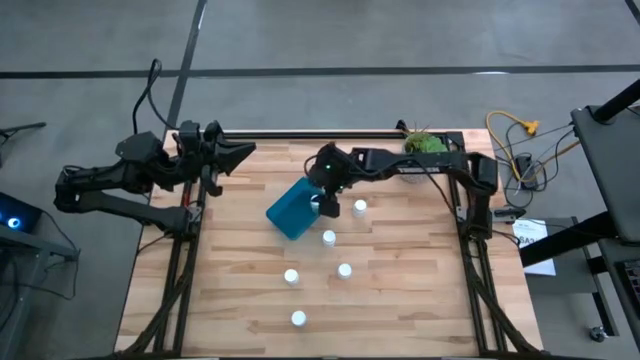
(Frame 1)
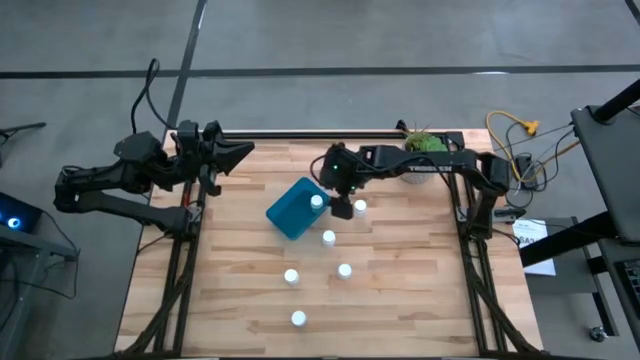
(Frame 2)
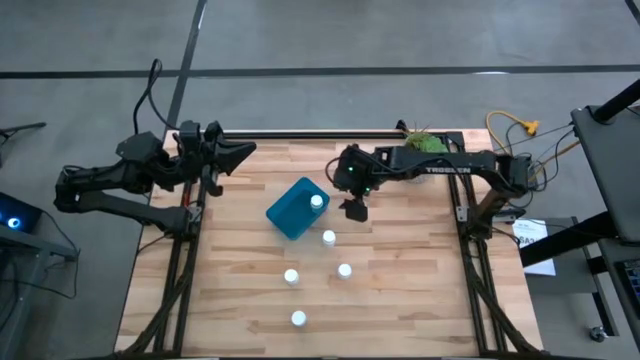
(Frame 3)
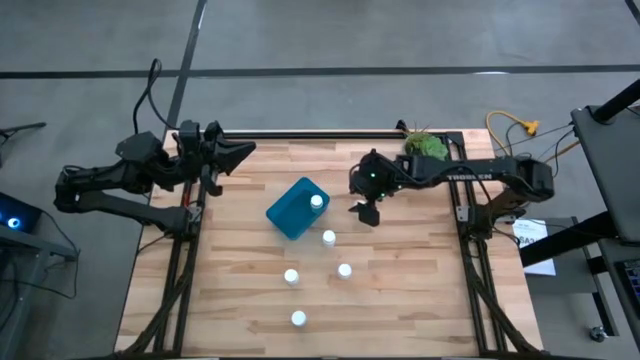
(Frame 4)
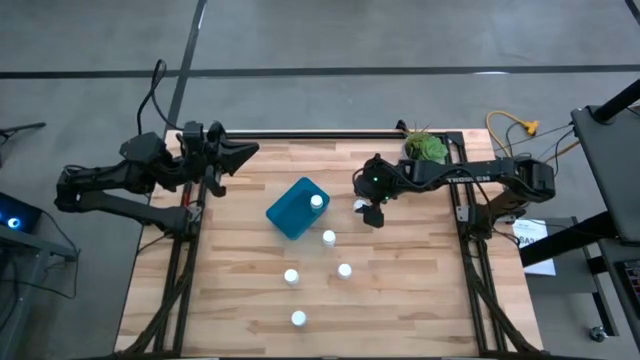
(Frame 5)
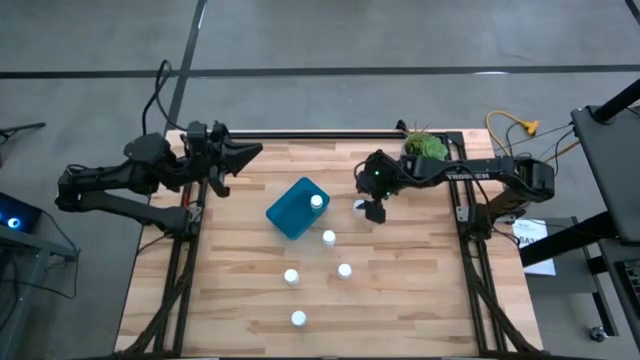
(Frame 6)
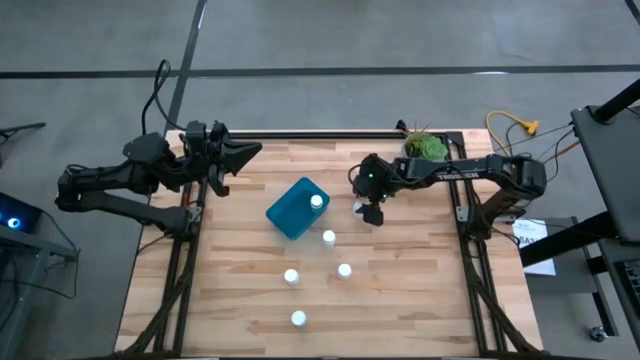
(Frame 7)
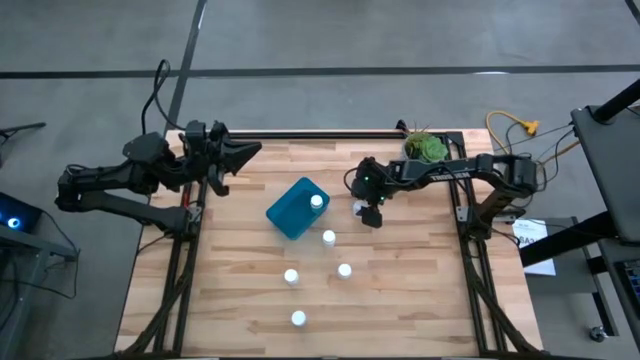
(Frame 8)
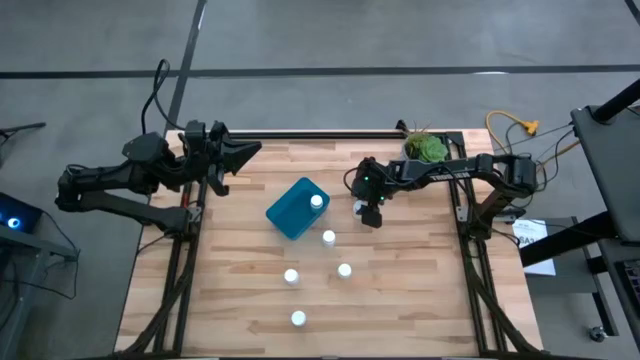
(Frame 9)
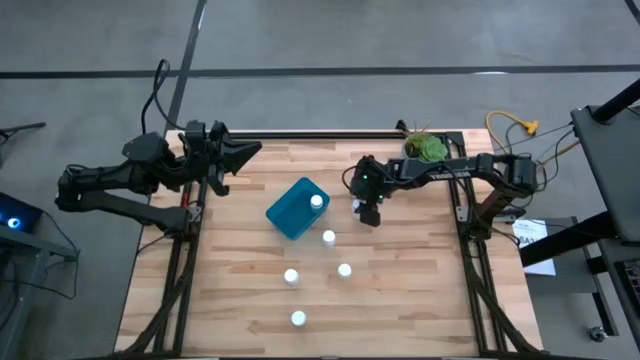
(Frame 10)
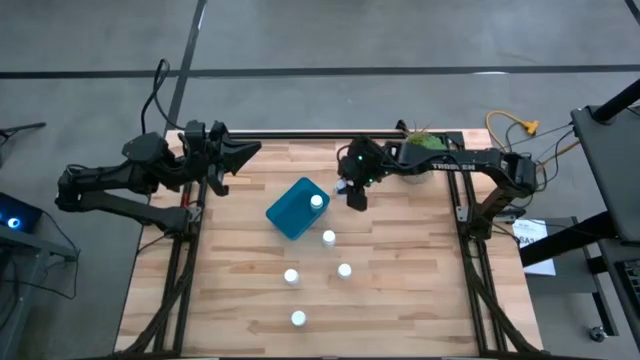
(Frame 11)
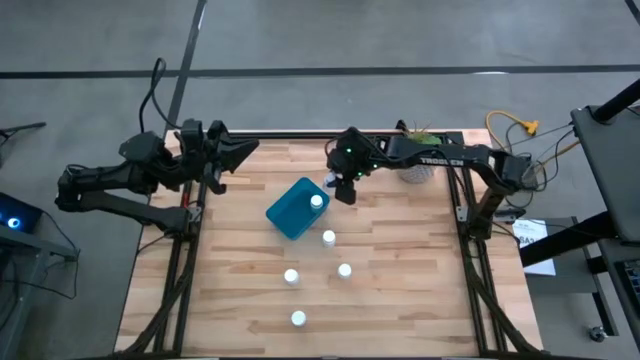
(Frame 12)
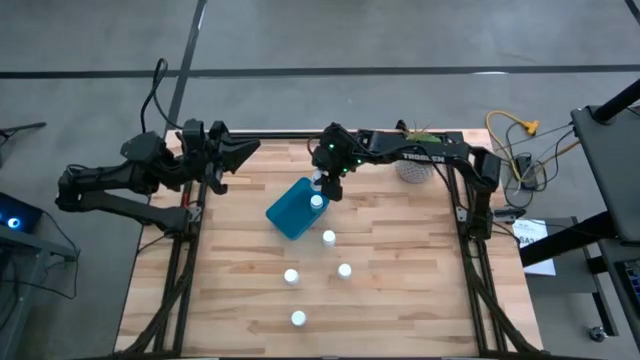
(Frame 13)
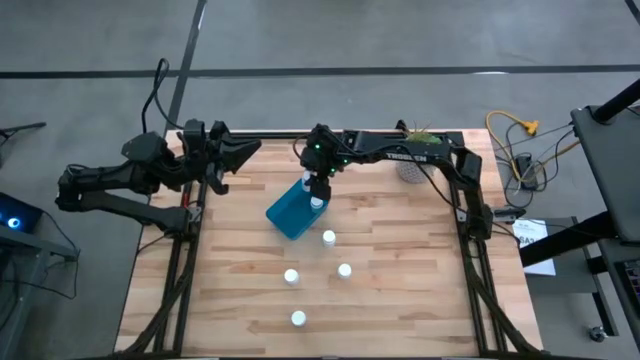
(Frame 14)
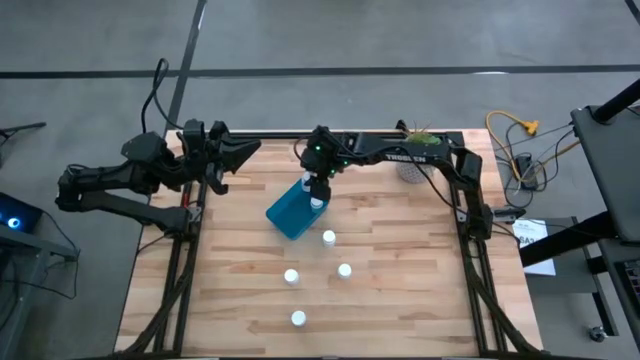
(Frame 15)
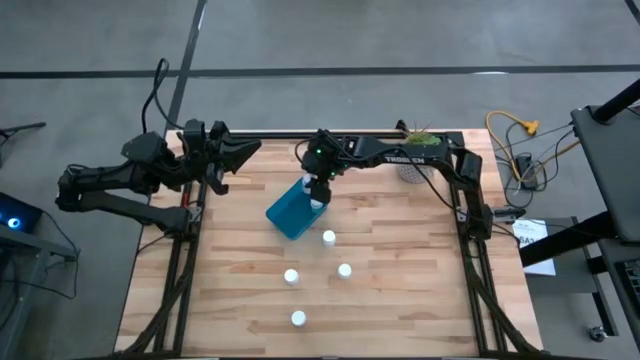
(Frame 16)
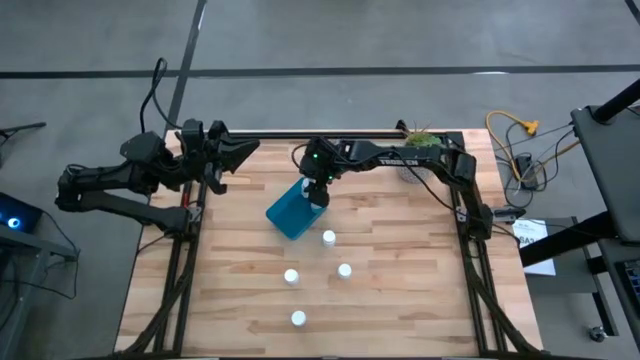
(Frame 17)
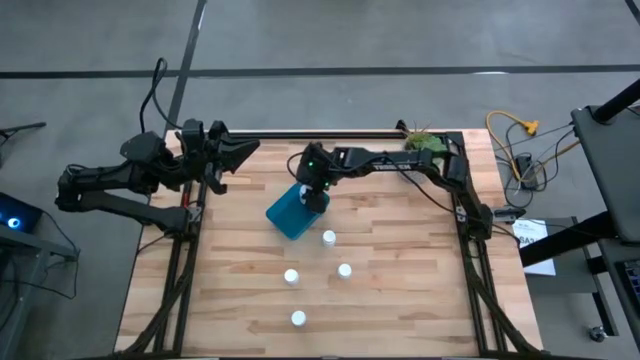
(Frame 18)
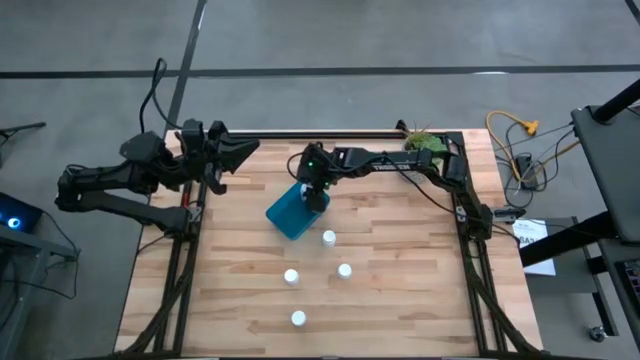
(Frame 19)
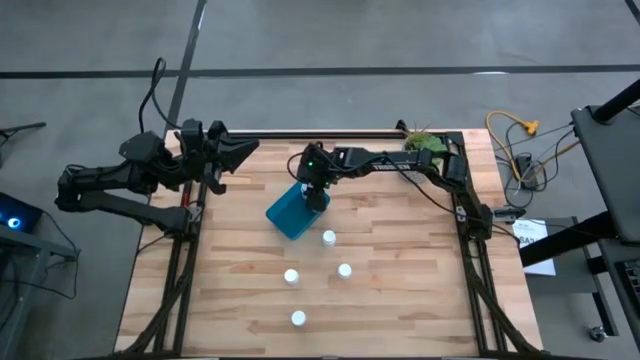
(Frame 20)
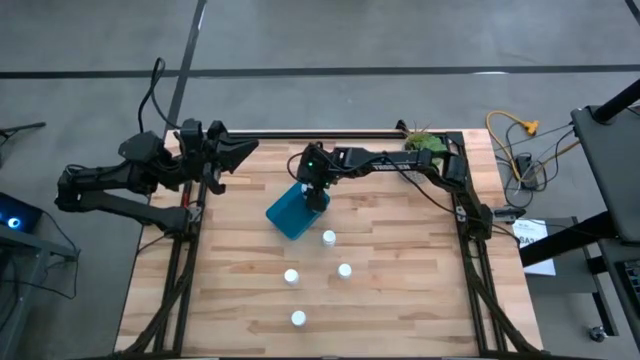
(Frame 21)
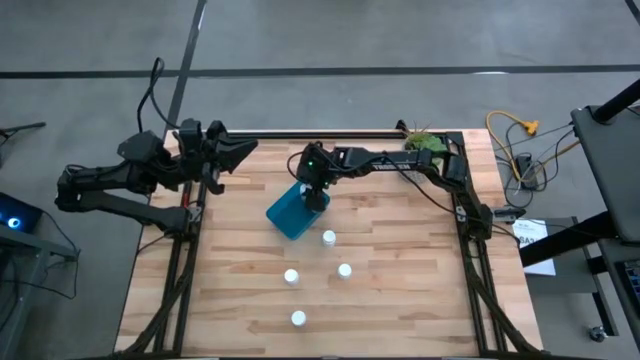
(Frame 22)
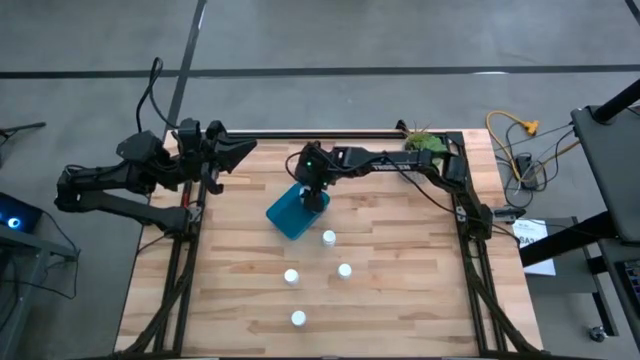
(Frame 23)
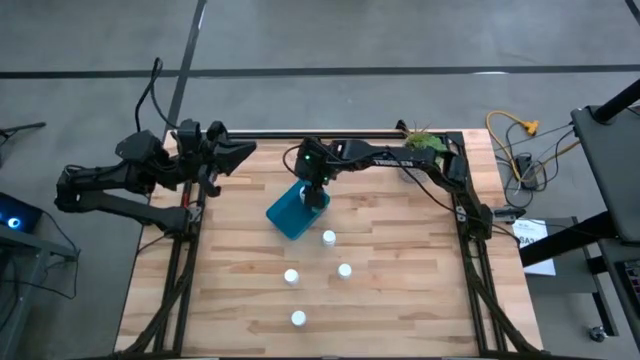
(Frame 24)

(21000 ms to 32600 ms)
Task: Pick and place pill bottles into a basket
Put the top white pill bottle into the blue container

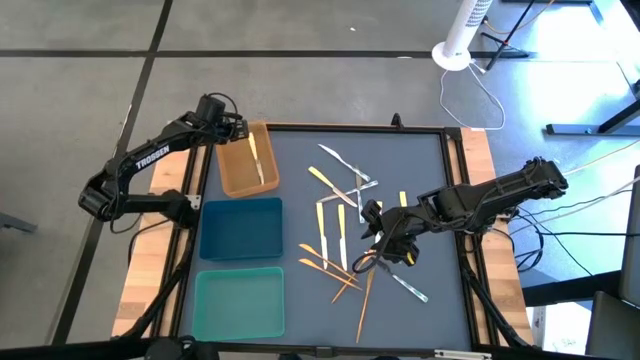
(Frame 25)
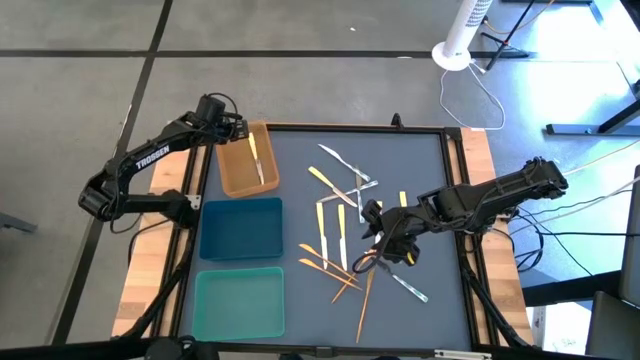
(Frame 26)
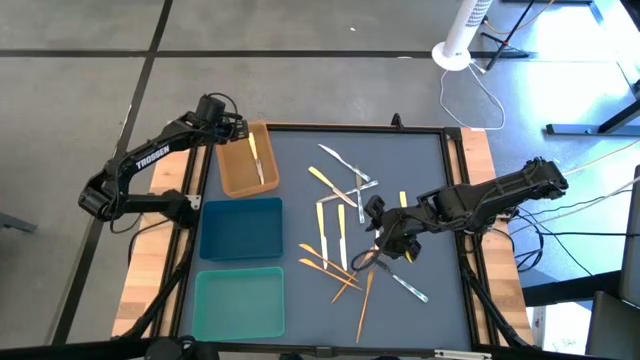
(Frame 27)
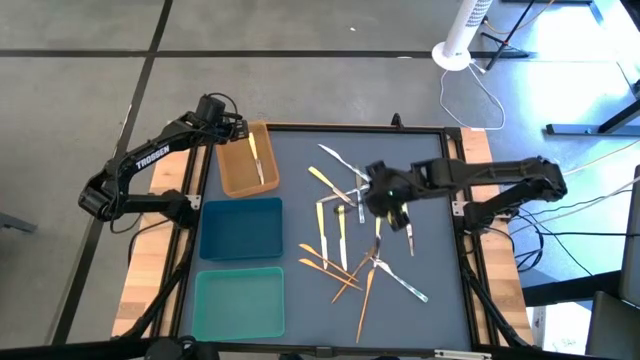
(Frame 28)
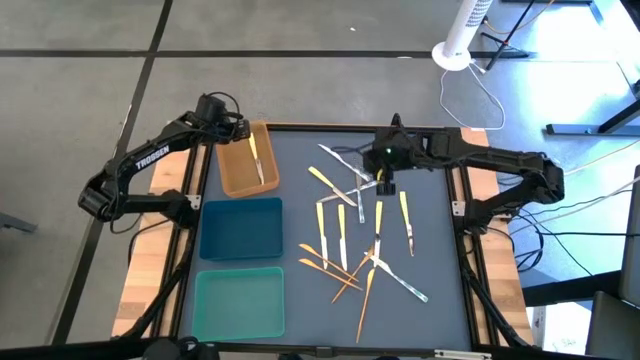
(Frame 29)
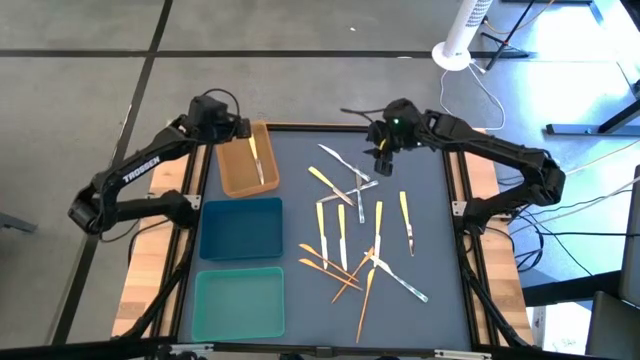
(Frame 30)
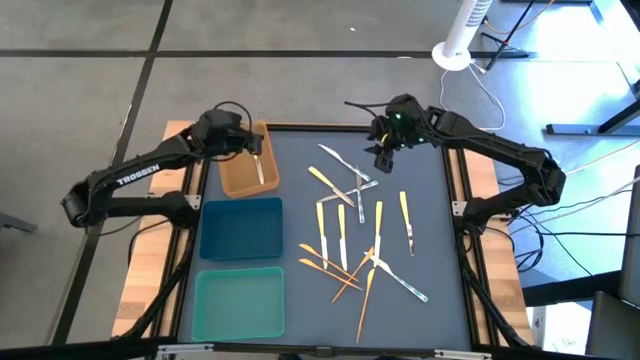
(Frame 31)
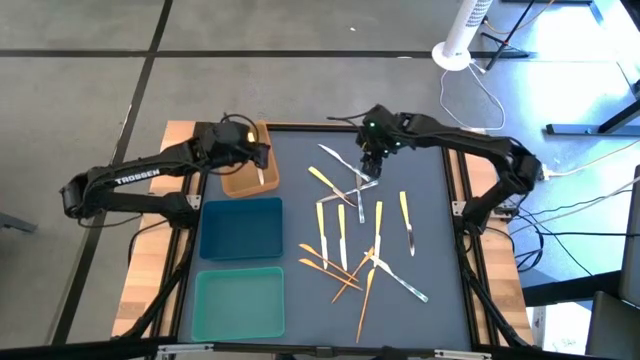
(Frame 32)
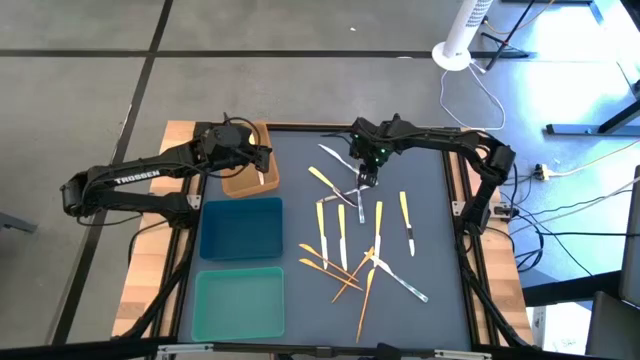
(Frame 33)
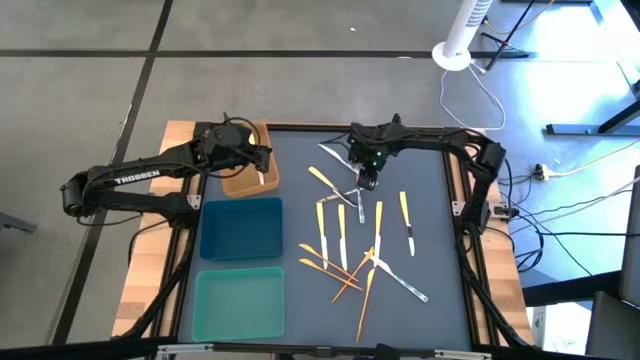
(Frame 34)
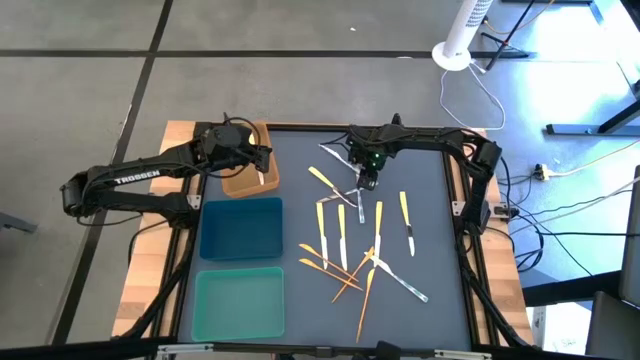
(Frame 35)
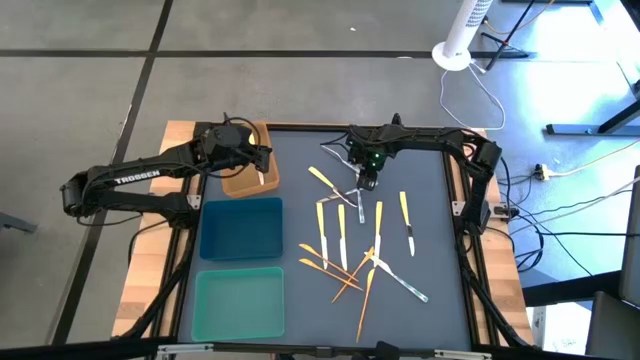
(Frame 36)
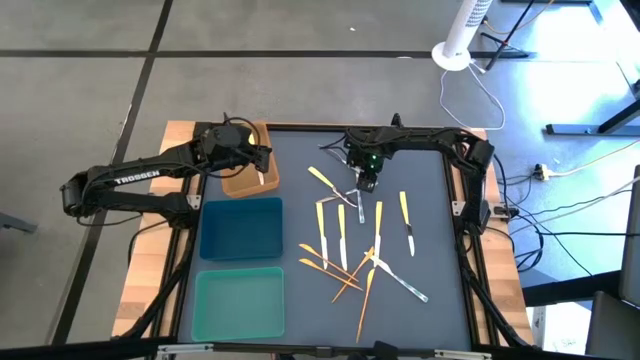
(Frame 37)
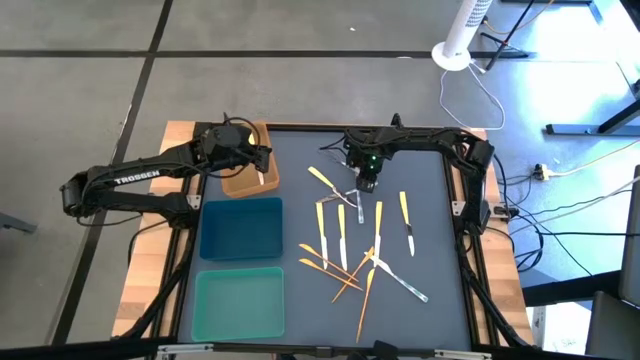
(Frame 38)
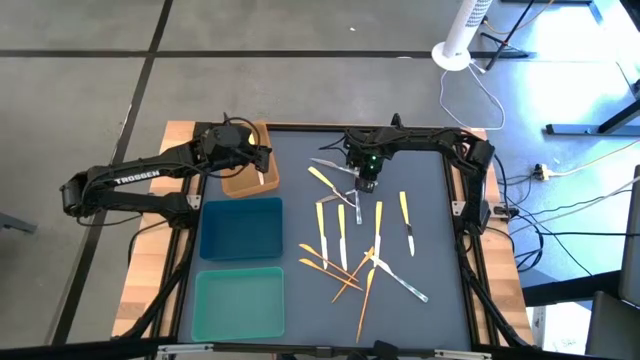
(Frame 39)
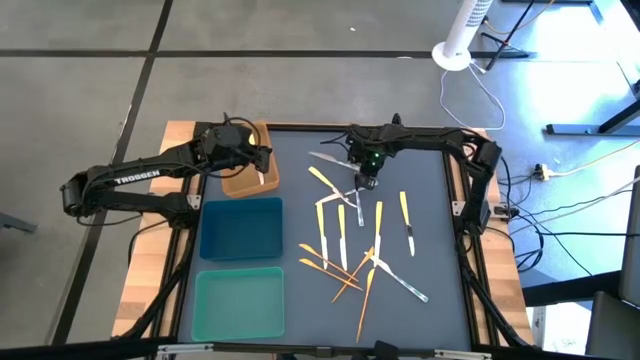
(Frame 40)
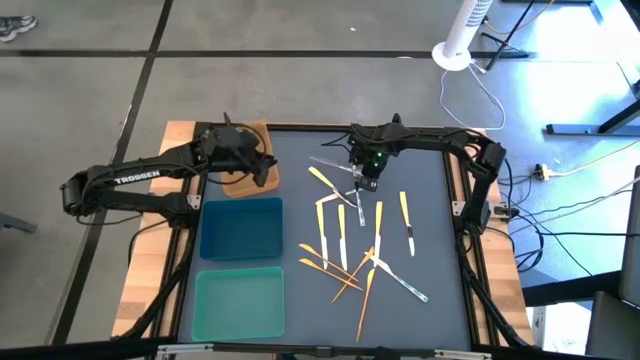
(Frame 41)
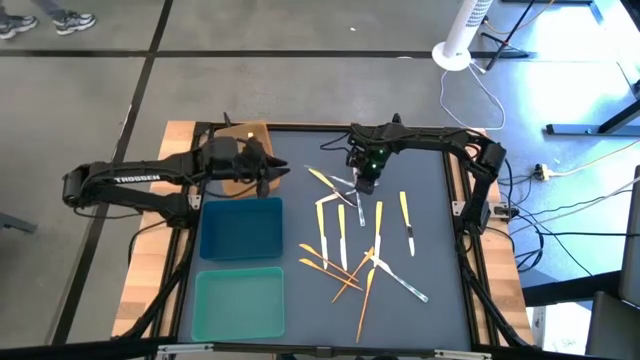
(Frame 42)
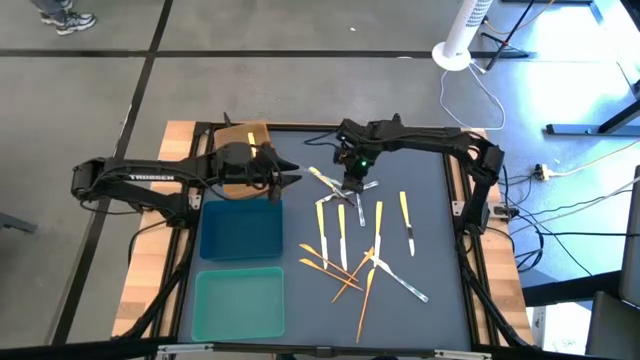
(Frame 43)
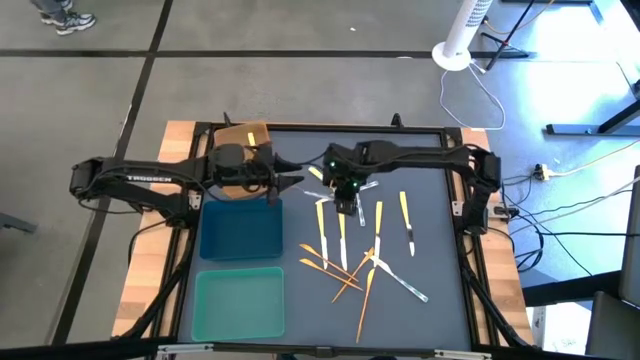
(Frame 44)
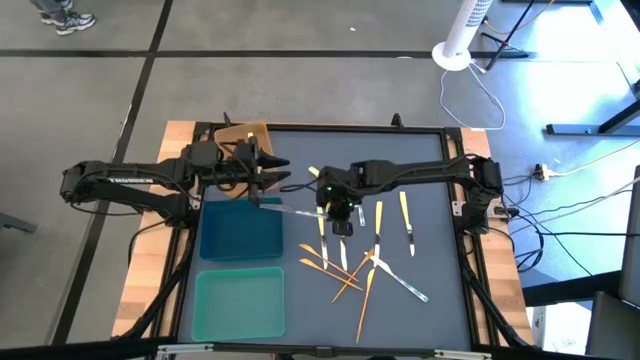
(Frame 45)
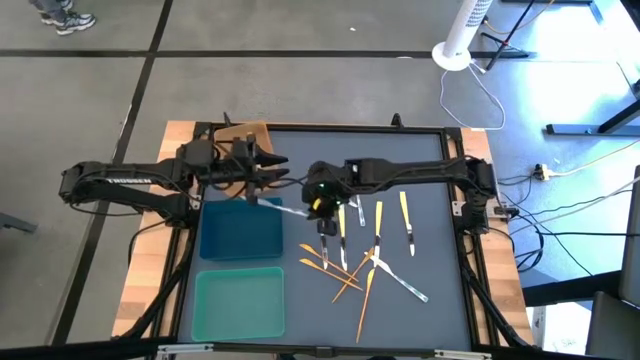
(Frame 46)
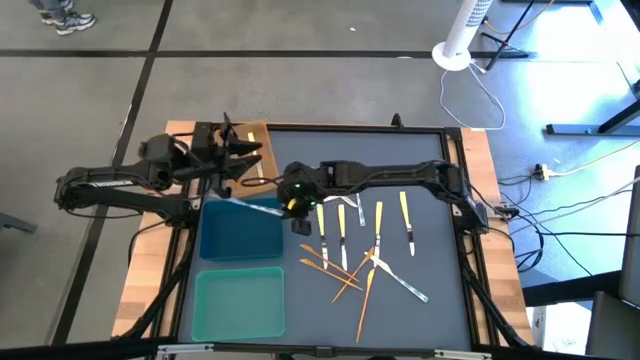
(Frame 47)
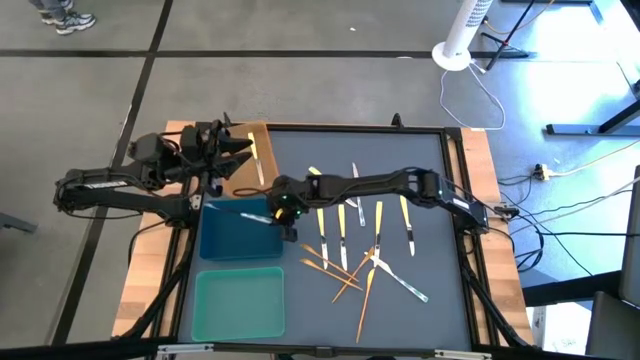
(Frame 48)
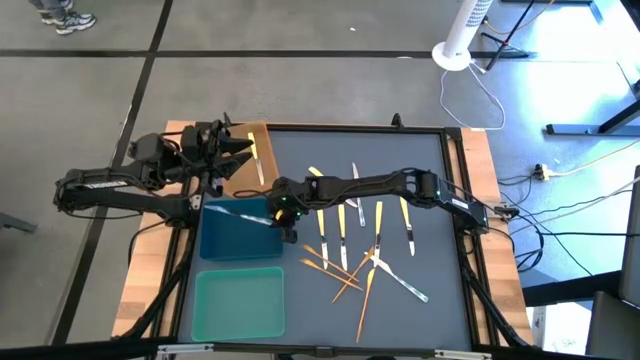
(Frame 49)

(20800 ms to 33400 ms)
Task: Sort silverware by color (type)
Put the white-green knife into the blue bin
